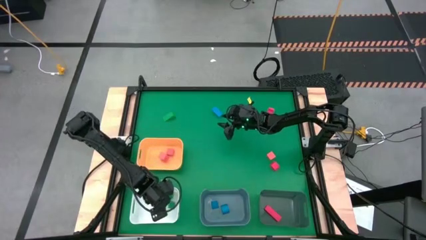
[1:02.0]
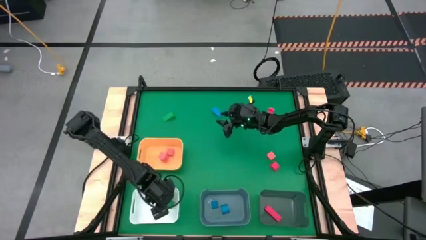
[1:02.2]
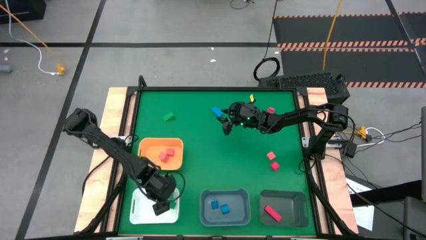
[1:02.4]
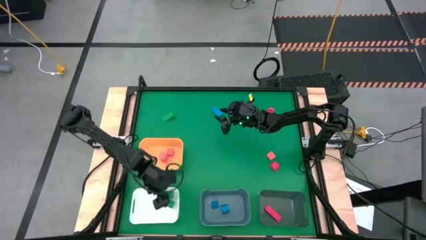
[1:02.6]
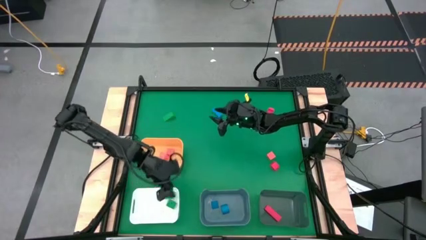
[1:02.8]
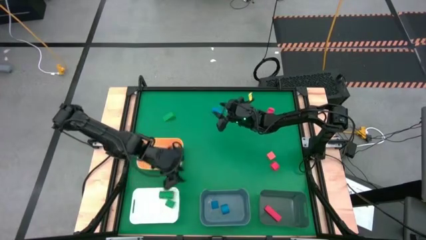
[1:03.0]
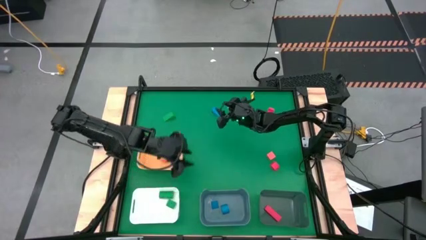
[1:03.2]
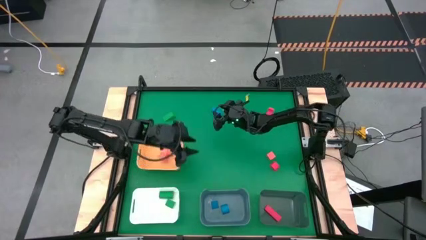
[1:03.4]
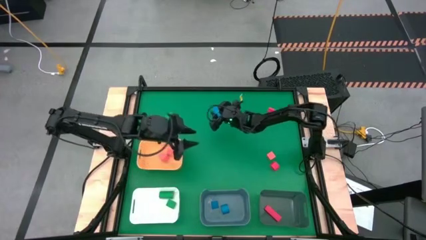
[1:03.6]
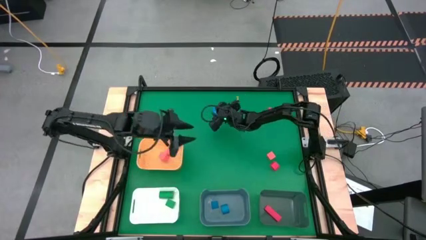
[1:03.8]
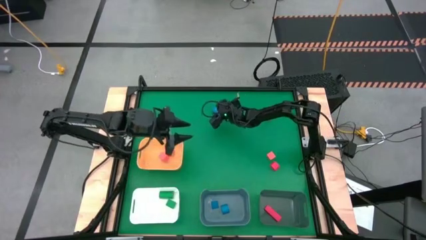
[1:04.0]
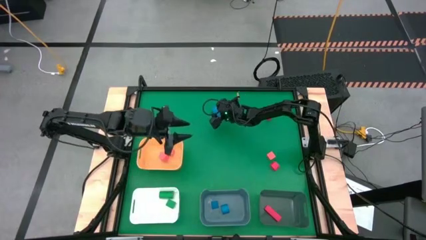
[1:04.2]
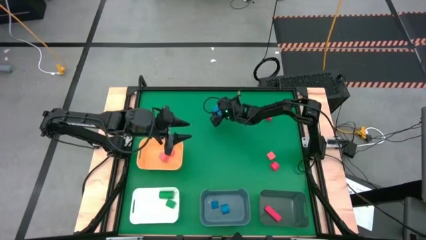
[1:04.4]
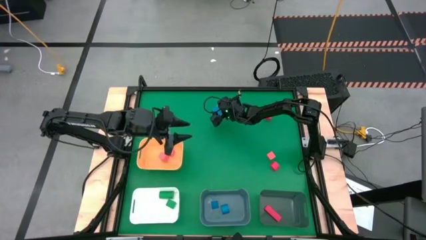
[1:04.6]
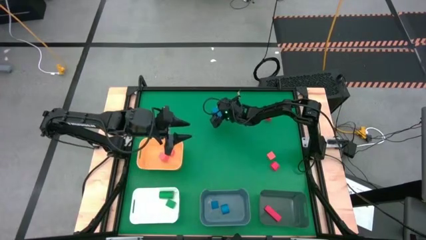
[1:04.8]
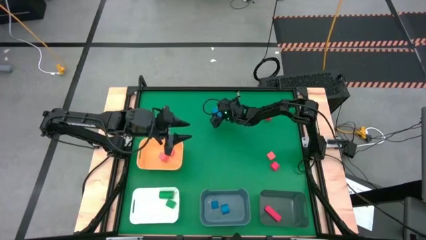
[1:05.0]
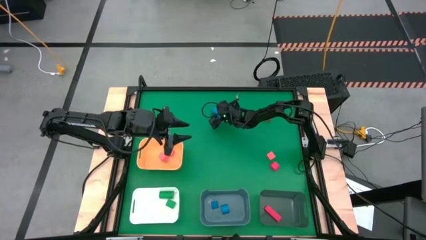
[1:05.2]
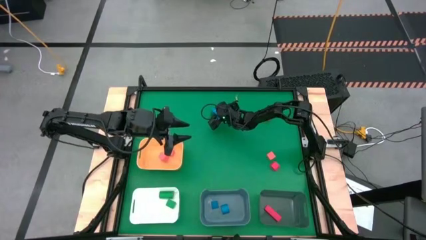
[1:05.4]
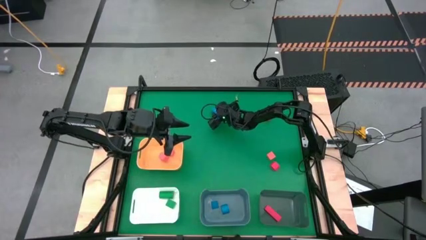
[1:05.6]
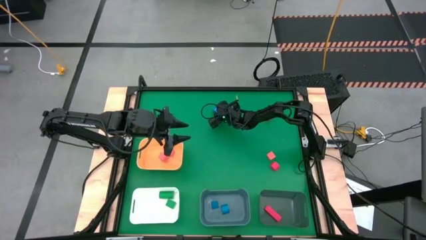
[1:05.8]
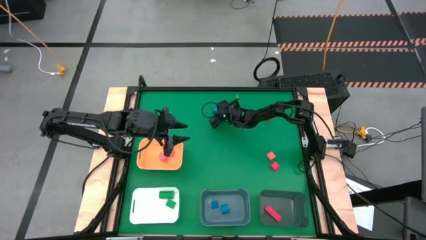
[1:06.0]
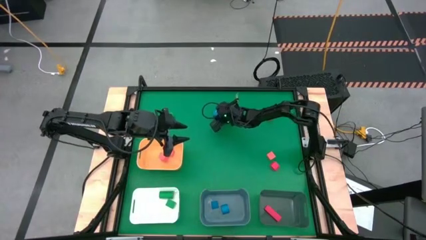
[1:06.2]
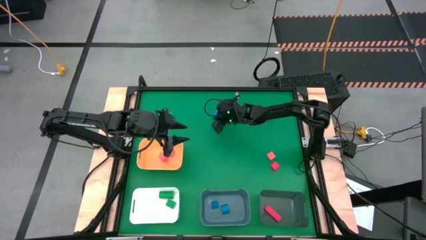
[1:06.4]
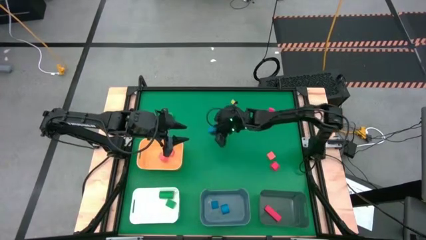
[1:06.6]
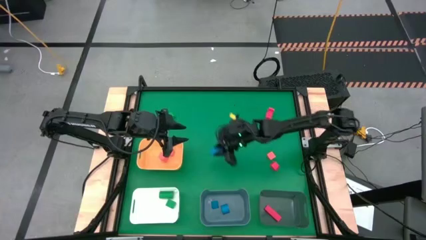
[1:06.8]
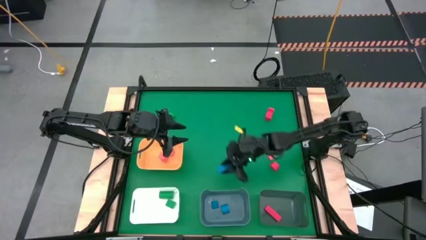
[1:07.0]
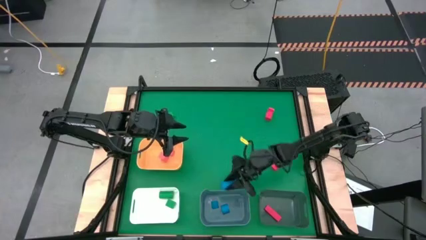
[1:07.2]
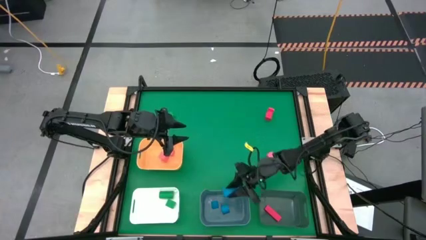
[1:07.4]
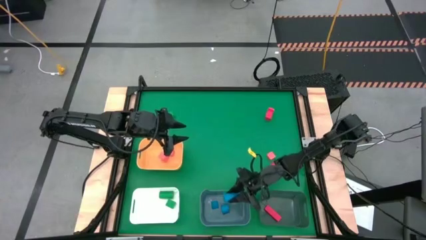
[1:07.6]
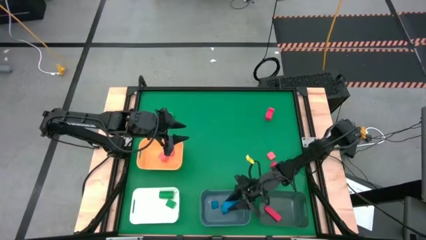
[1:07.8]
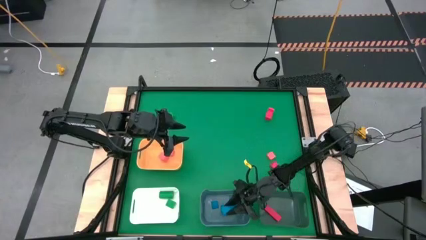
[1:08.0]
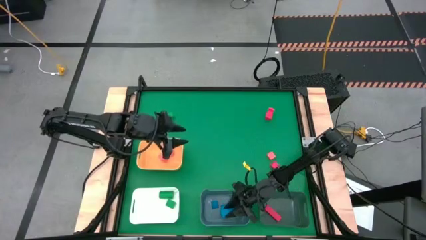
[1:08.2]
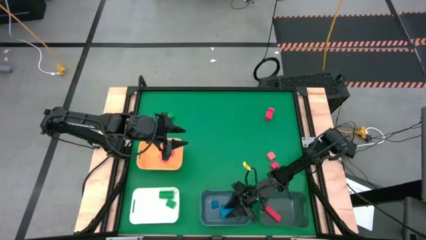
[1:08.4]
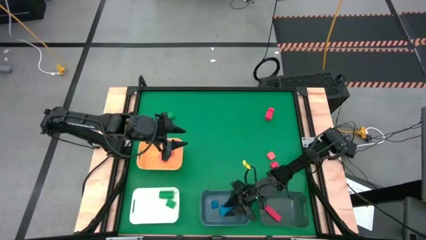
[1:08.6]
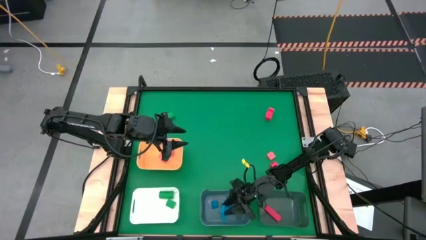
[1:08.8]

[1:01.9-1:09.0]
Task: Sort & place blocks by color
Put the blue block into the blue bin

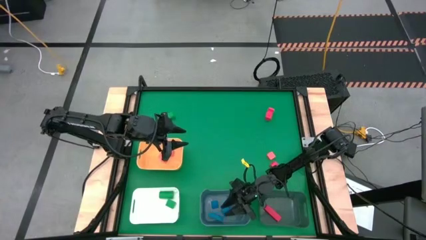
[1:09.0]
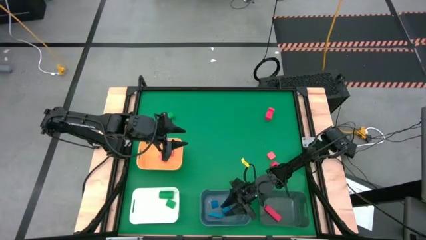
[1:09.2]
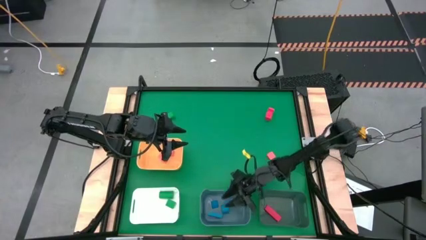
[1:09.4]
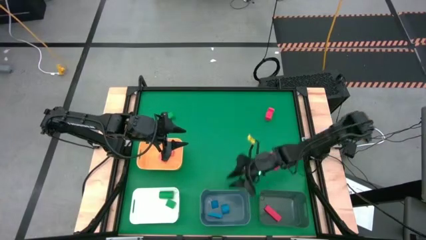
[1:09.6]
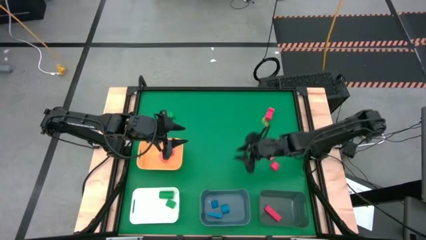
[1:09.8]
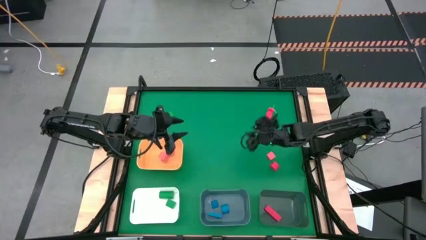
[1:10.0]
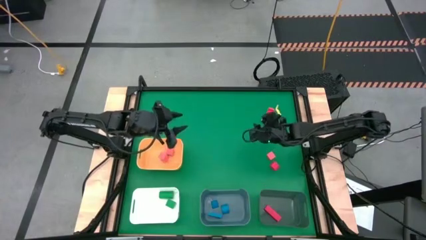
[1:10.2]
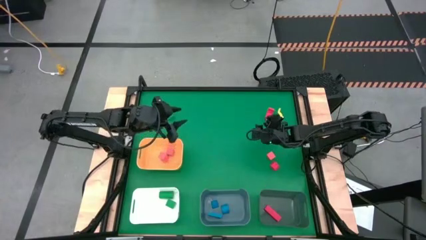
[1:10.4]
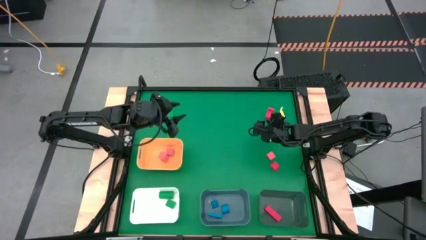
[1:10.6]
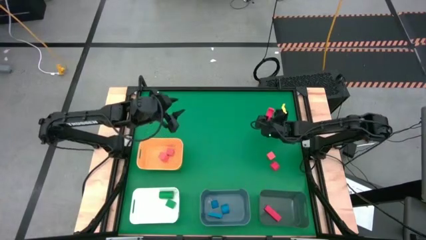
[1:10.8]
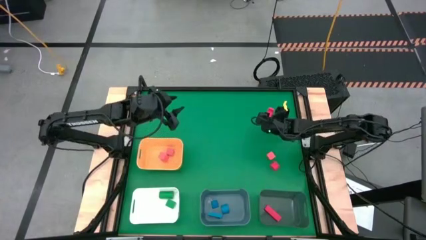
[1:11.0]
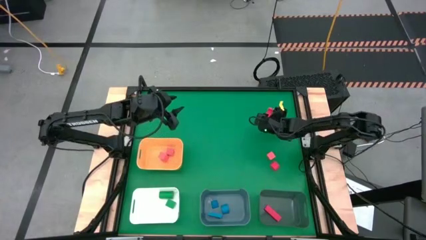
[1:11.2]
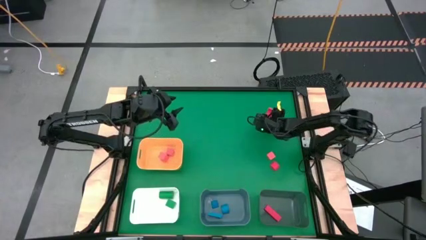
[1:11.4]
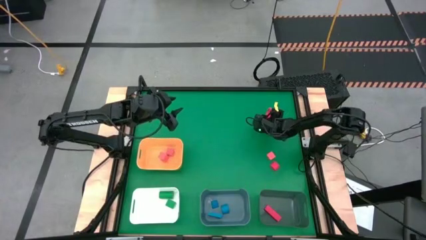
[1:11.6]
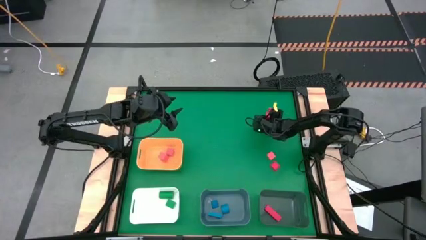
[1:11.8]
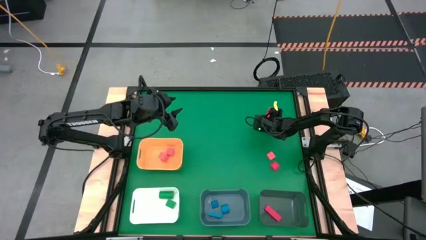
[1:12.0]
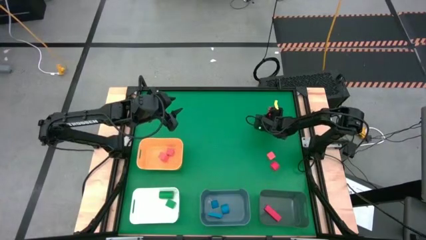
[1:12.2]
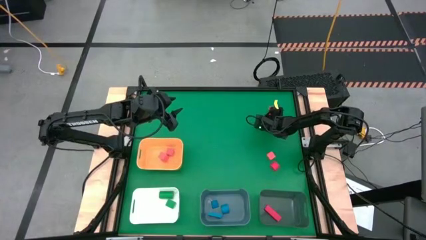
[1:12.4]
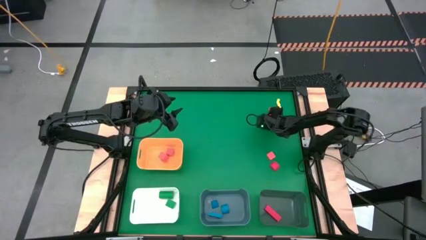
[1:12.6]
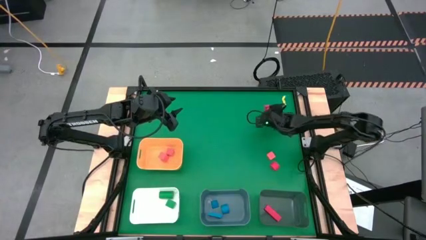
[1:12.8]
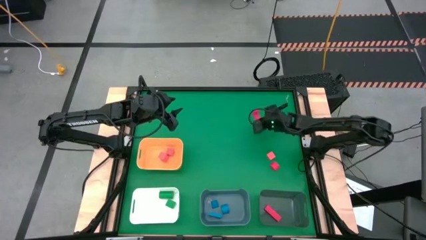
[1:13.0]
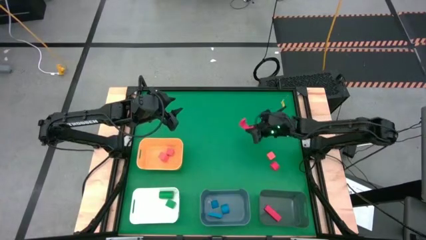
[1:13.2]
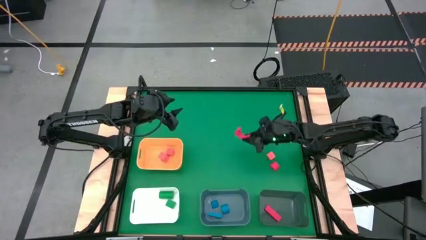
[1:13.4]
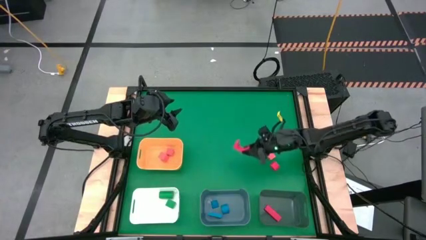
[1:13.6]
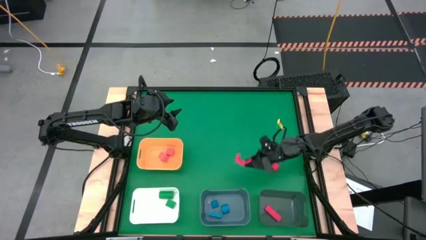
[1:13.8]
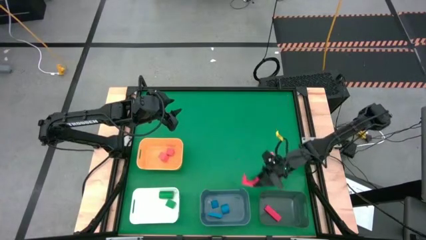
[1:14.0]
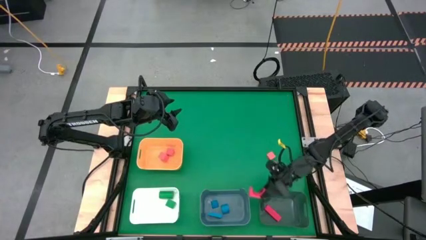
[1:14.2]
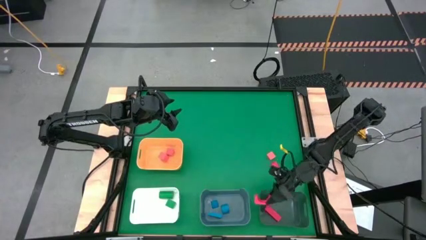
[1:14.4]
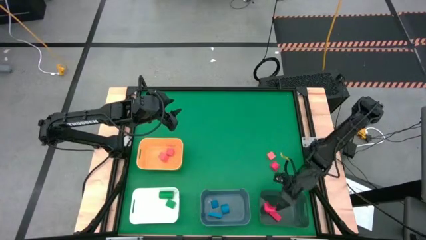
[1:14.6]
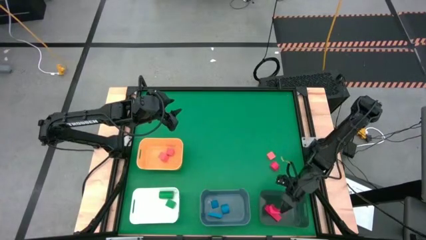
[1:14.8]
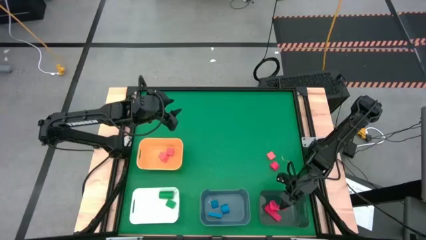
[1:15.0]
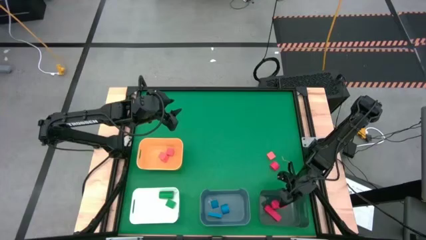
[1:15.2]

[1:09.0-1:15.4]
Put the top red block into the gray bin

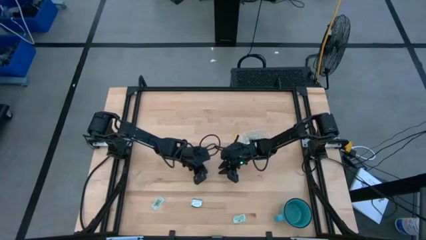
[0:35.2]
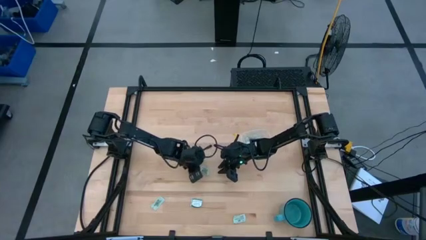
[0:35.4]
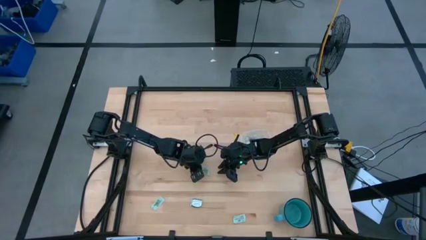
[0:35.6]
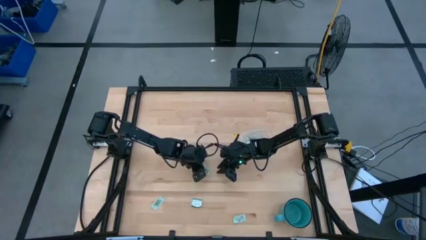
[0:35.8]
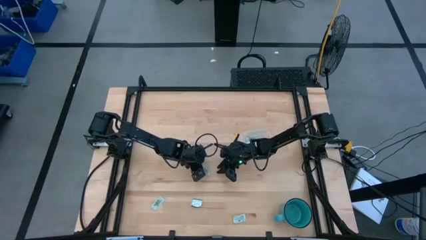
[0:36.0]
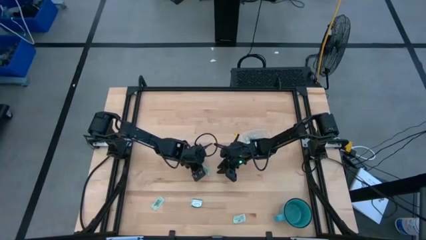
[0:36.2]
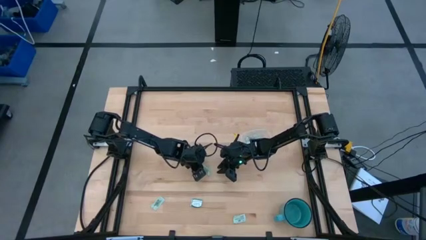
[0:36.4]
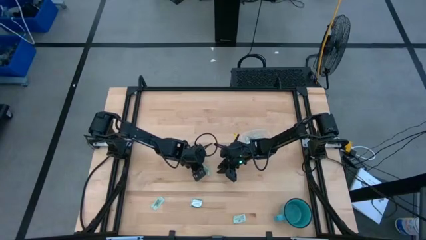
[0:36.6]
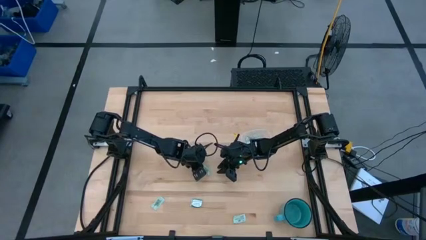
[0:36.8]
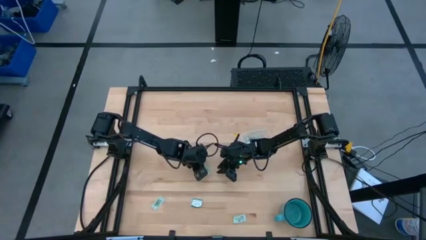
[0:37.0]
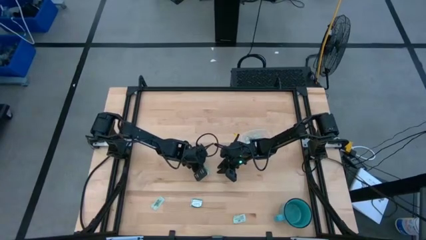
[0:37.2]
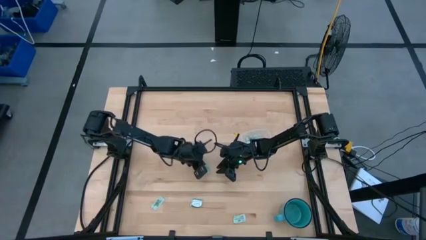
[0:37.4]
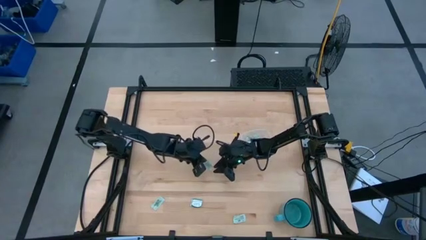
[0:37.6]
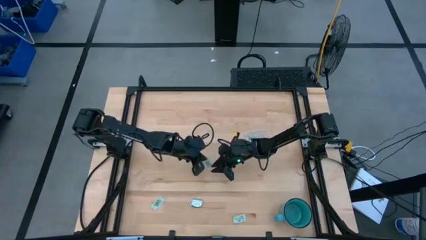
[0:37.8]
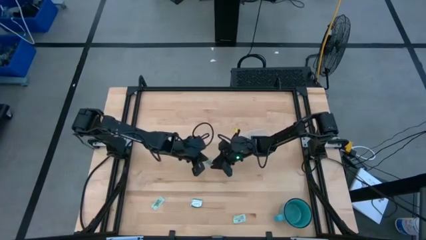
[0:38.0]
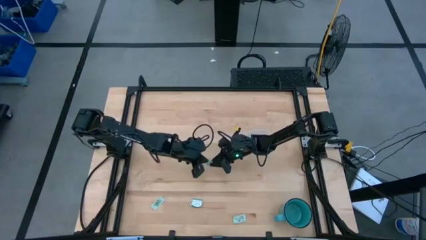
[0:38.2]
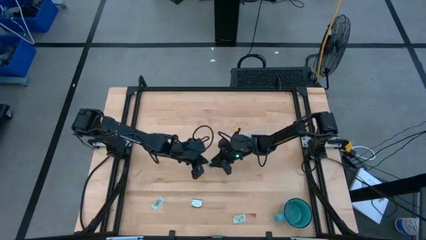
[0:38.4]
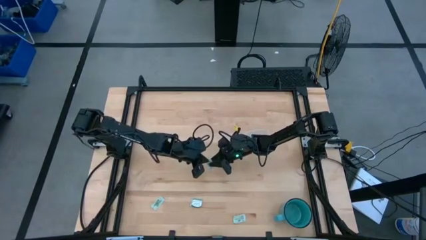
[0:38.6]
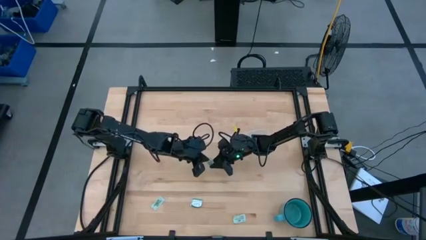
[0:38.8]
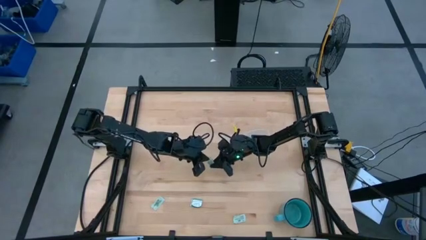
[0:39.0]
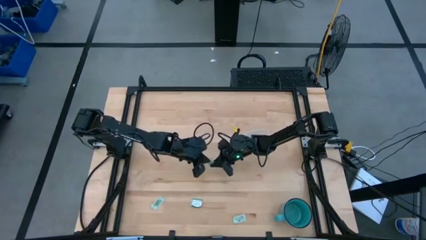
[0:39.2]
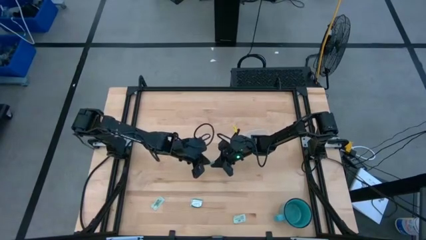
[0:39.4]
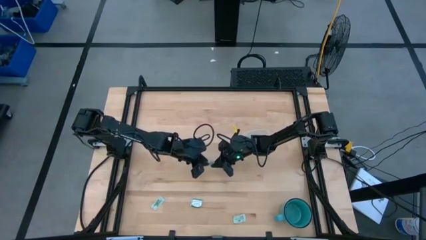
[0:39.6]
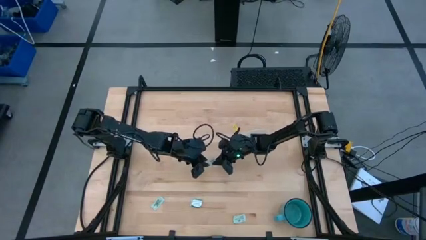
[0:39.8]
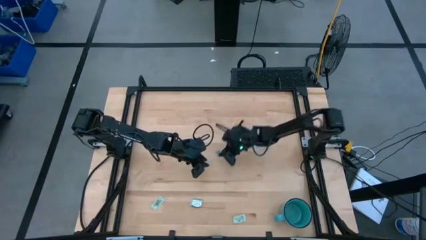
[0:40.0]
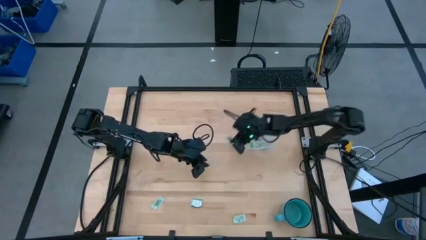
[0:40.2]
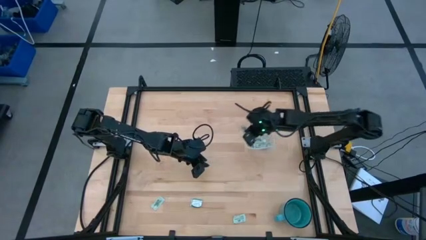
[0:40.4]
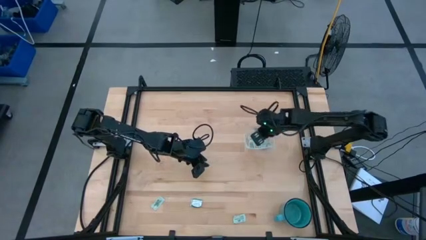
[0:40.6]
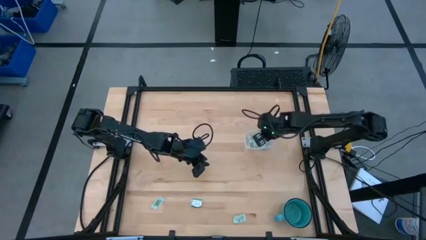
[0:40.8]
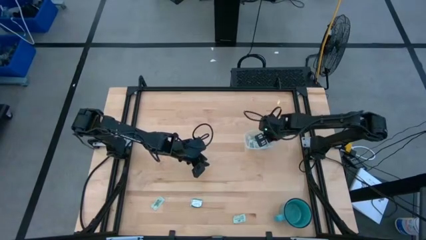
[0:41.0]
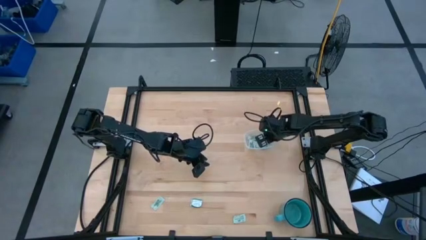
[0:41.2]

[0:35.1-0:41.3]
Task: Pick and place Stevia / Truvia into bins
Put the green stevia packet into the transparent bin
